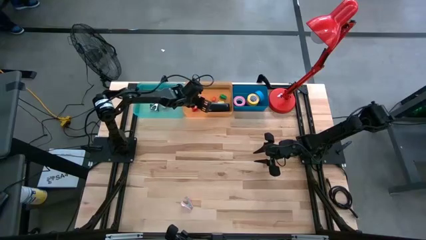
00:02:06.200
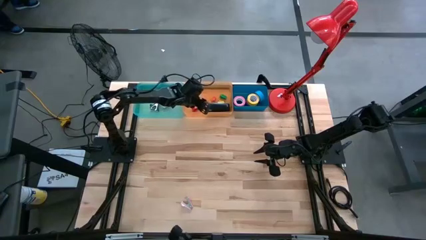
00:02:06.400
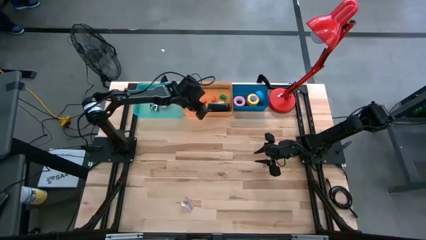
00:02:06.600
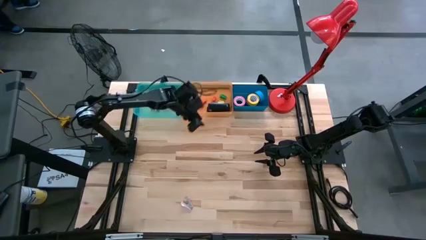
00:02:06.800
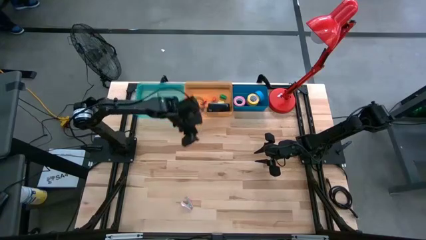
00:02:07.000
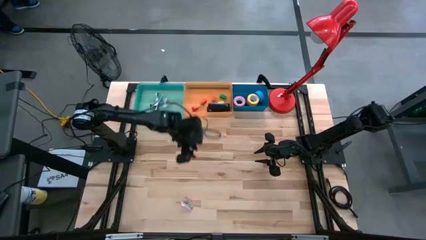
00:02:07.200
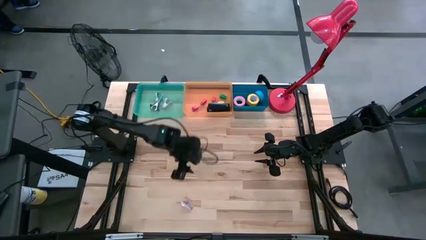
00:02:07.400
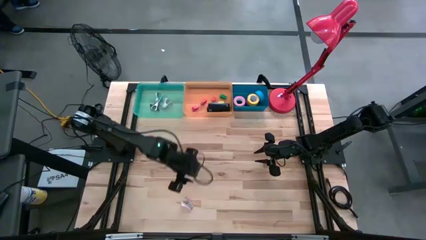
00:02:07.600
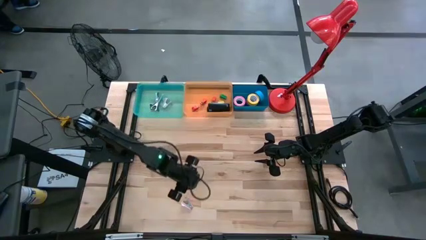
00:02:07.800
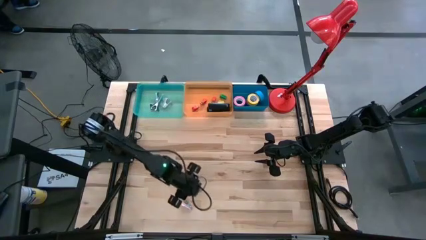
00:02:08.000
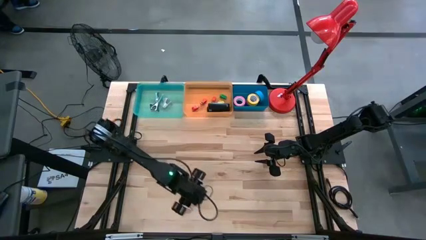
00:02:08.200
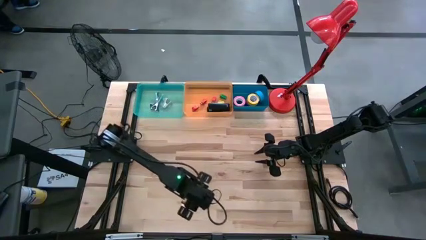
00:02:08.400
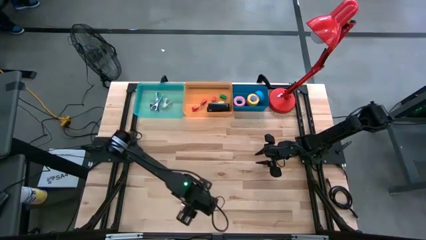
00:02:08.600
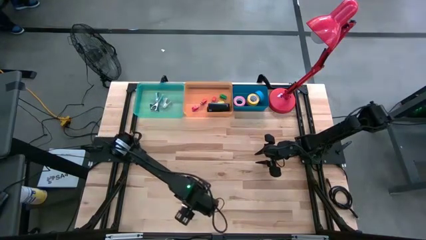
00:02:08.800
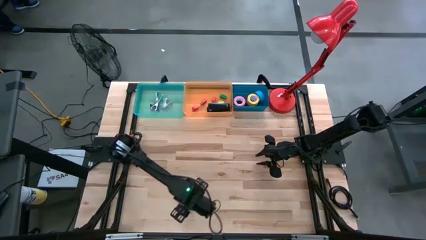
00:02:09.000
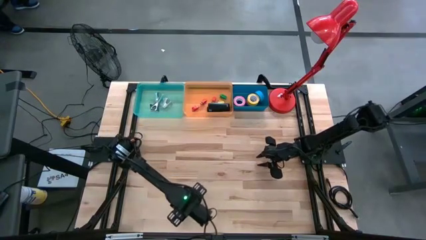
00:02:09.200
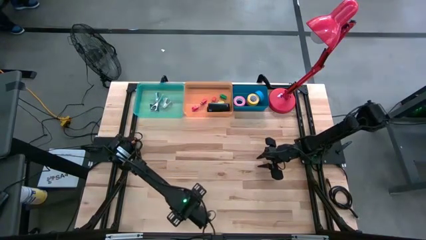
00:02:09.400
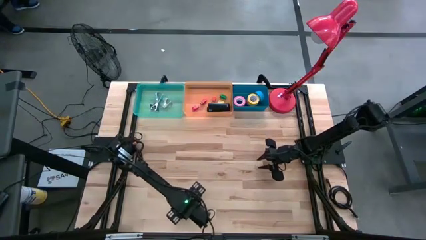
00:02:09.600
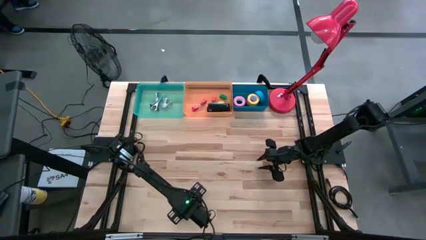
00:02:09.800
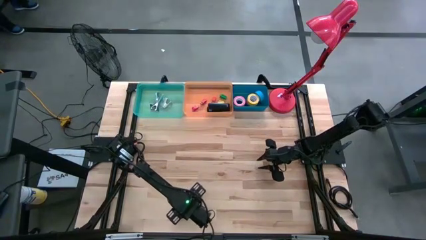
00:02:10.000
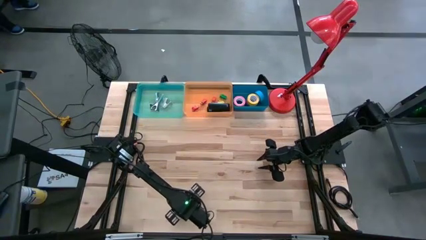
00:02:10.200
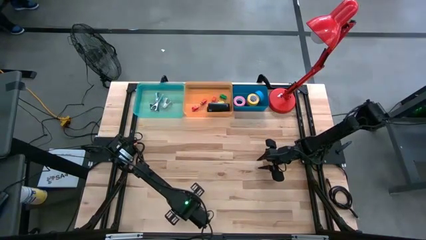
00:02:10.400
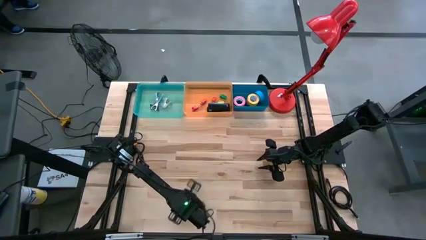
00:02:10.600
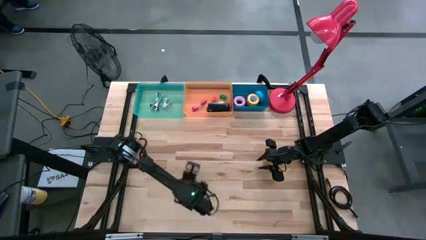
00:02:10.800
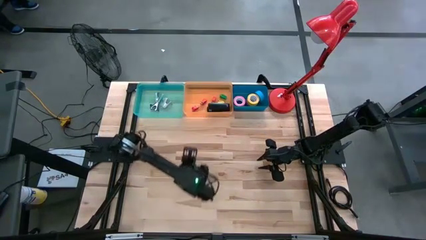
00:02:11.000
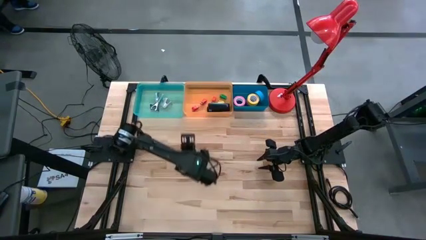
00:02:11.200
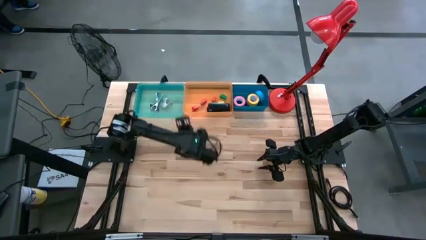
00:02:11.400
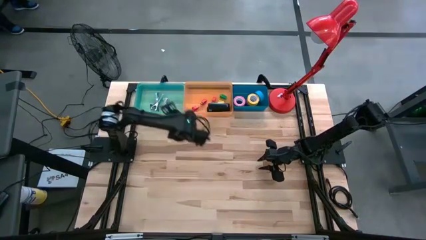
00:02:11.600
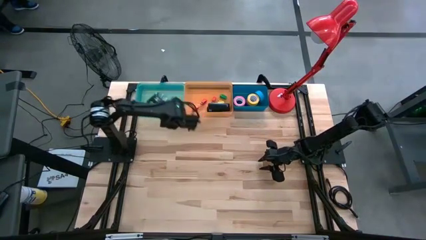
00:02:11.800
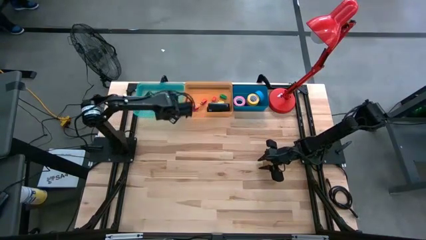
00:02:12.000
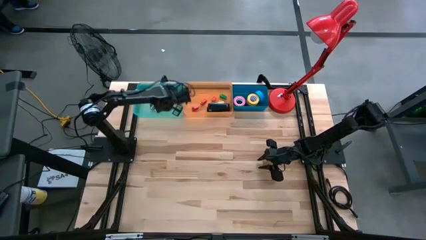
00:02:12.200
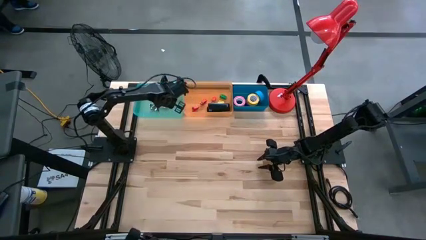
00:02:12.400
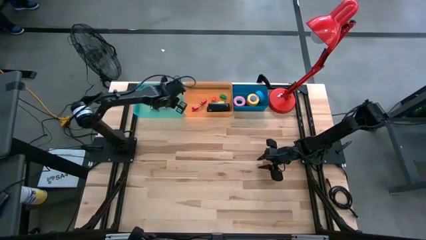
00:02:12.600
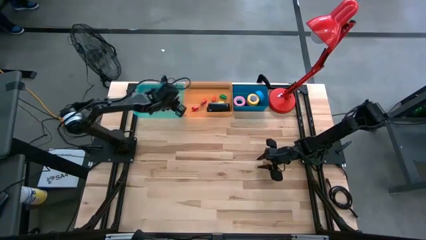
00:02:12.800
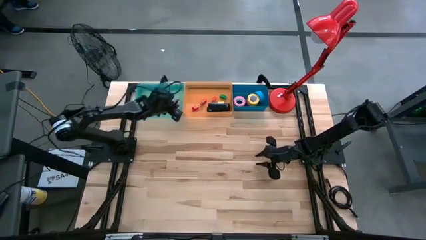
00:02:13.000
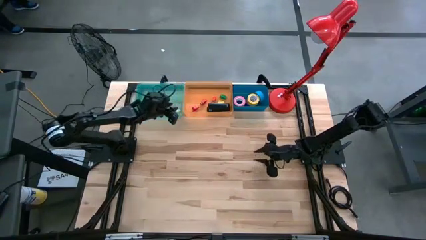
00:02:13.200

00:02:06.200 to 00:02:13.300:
Task: Pick and place Stapler, Stapler remover, tape
Put the pink staple remover into the green bin

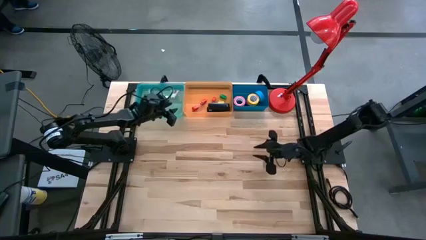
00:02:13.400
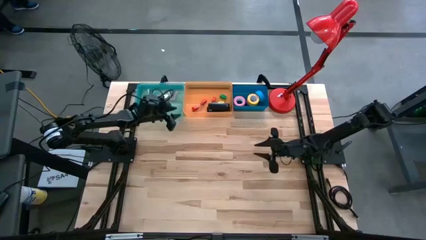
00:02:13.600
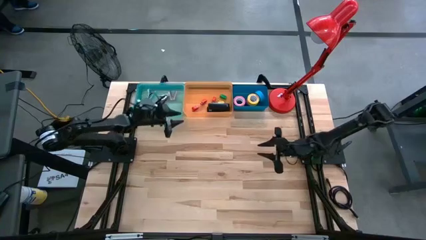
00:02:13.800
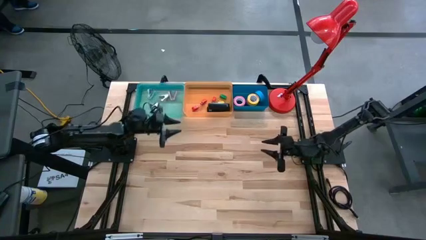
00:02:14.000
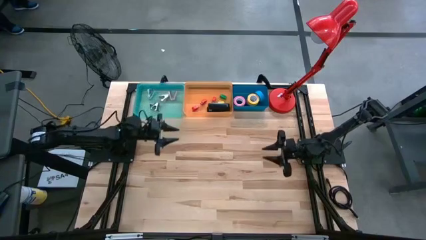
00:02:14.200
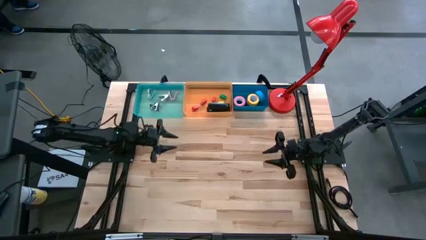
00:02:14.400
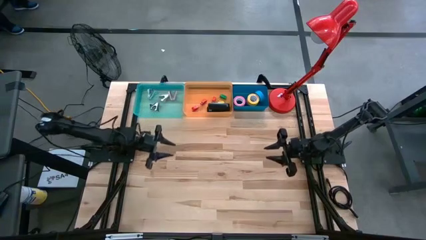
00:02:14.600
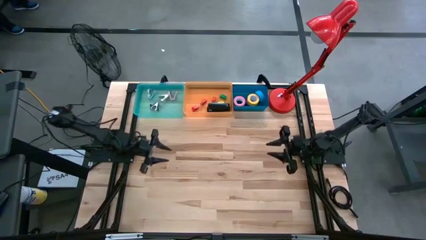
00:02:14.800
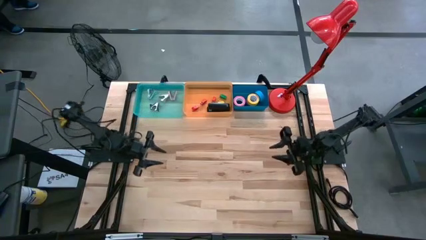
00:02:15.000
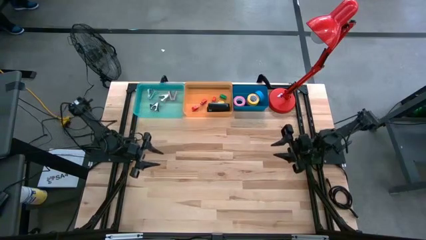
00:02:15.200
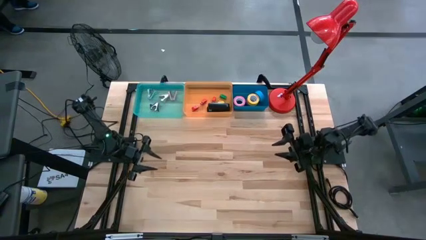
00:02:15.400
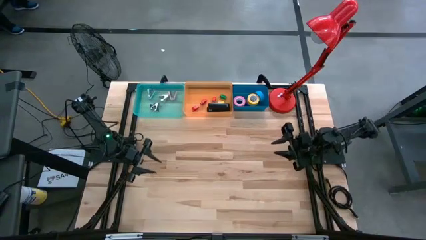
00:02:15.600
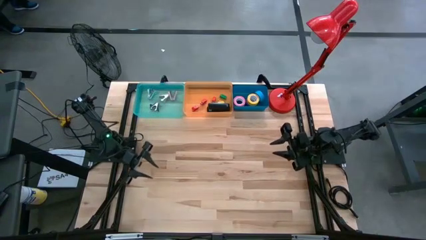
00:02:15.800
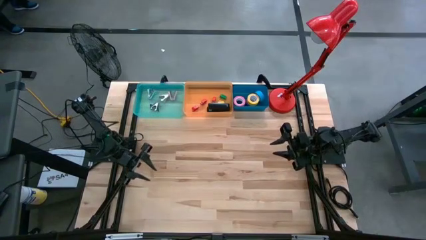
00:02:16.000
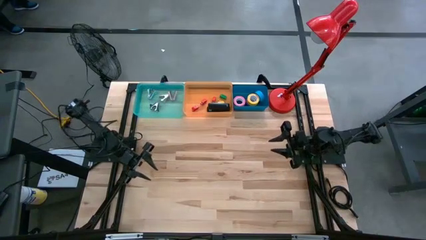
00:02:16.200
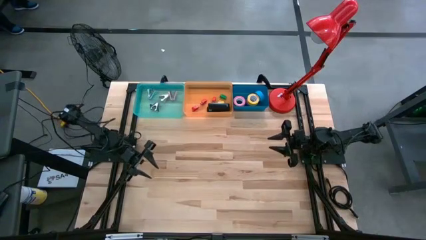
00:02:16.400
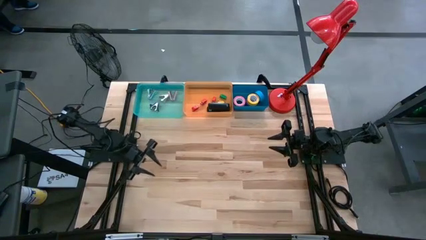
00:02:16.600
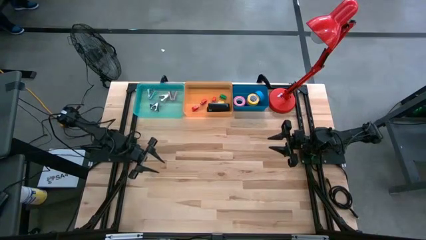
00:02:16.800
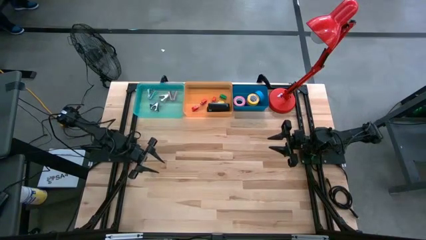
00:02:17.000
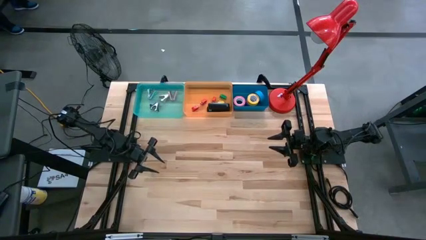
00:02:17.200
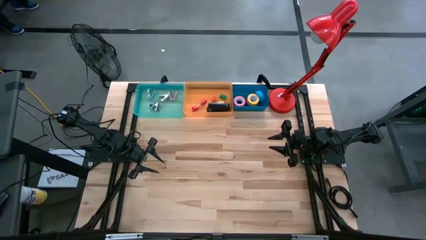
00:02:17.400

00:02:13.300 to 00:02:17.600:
Return to Home Position

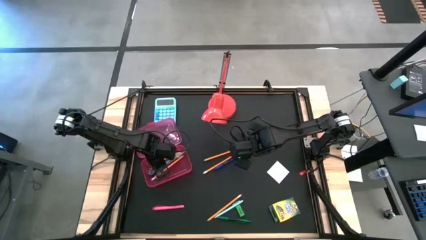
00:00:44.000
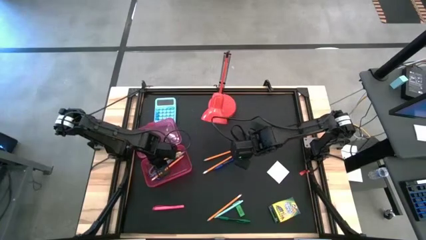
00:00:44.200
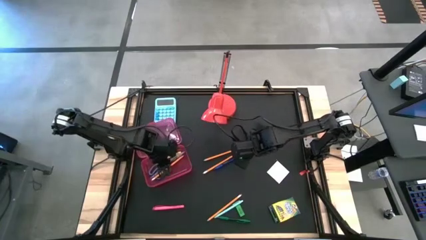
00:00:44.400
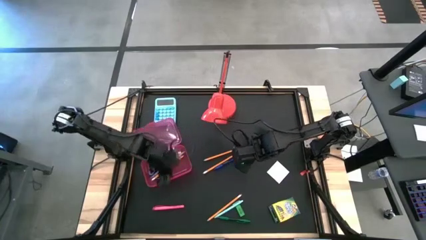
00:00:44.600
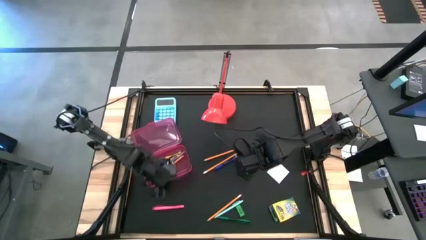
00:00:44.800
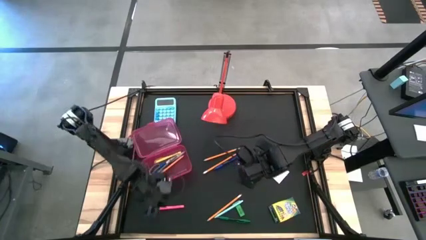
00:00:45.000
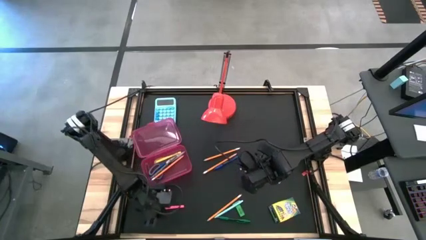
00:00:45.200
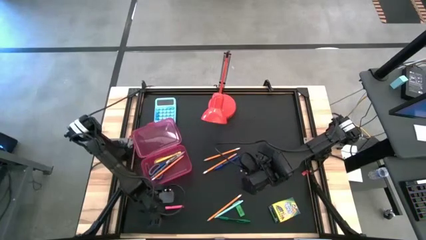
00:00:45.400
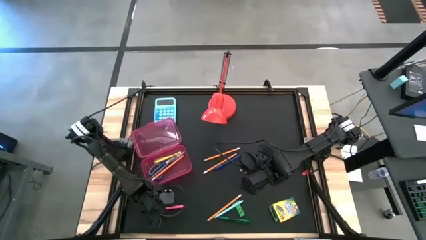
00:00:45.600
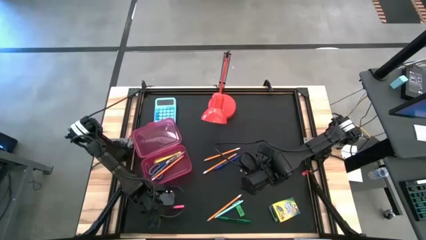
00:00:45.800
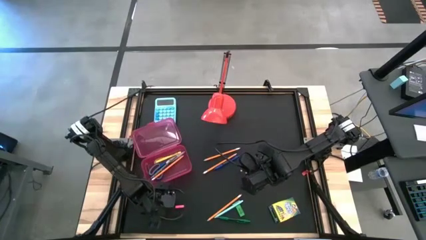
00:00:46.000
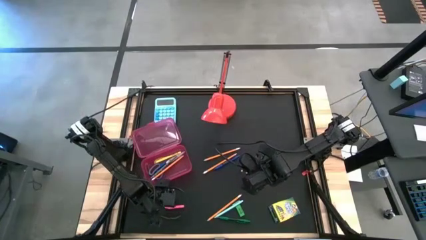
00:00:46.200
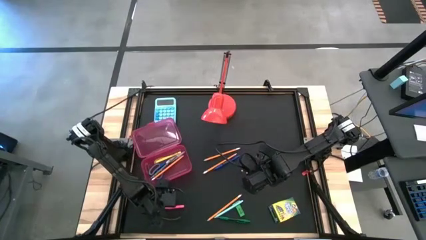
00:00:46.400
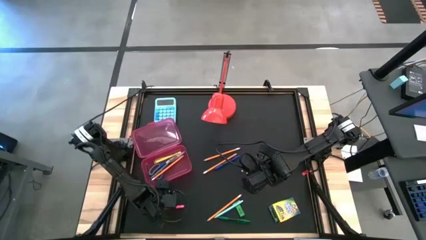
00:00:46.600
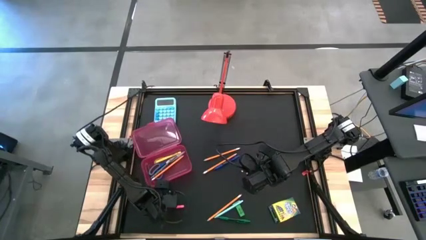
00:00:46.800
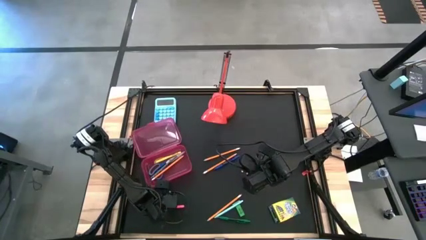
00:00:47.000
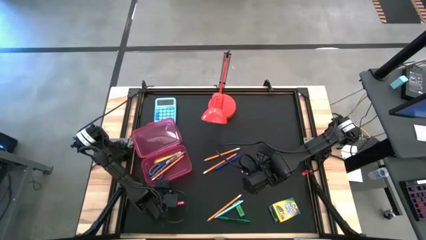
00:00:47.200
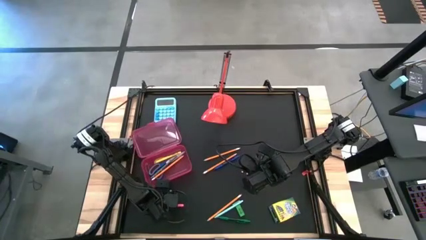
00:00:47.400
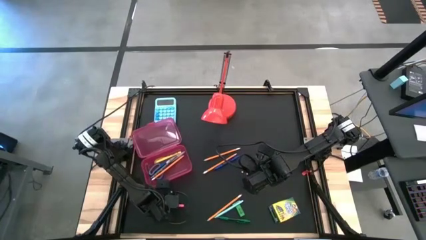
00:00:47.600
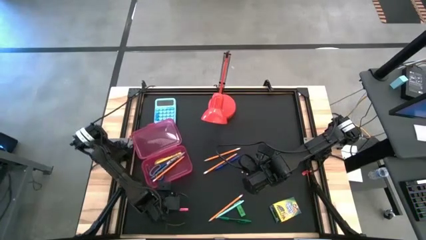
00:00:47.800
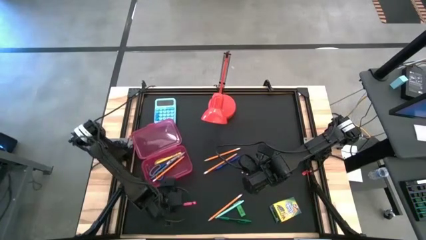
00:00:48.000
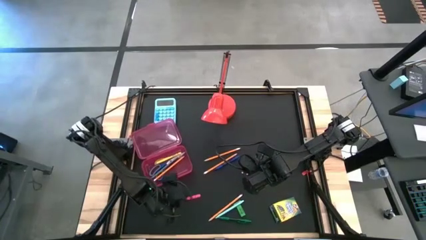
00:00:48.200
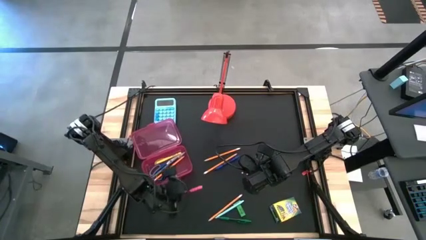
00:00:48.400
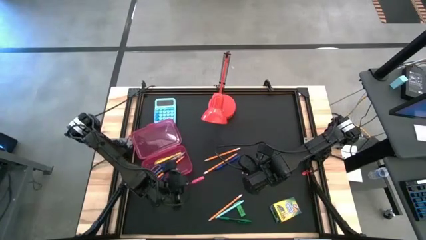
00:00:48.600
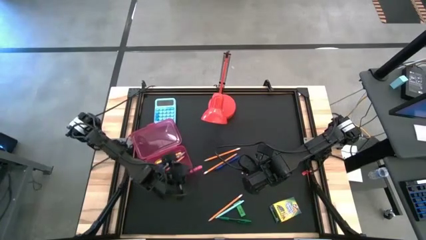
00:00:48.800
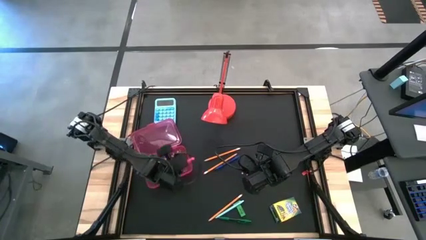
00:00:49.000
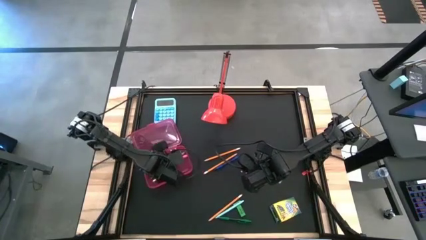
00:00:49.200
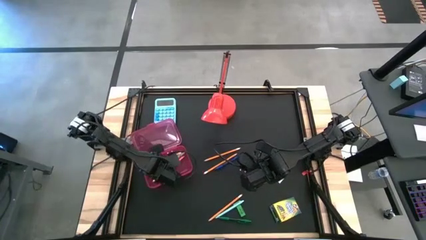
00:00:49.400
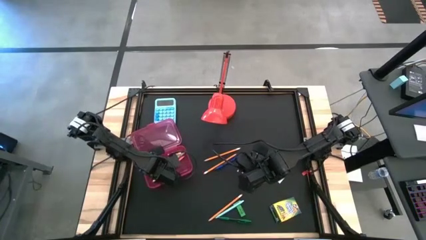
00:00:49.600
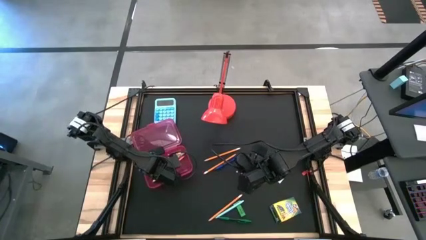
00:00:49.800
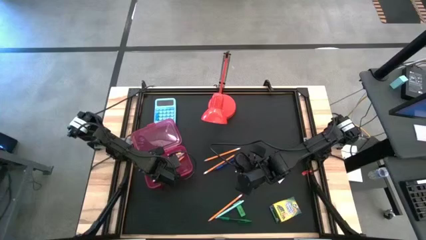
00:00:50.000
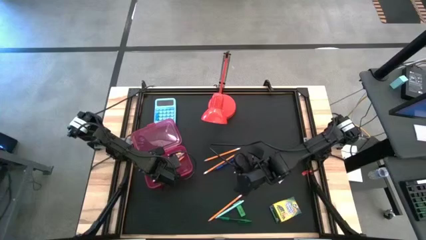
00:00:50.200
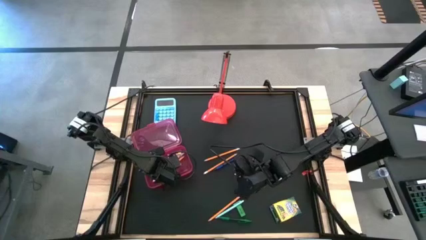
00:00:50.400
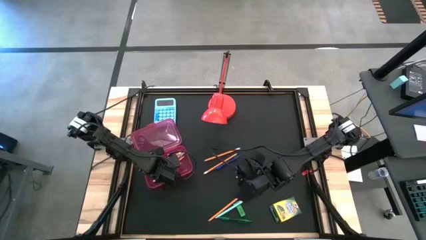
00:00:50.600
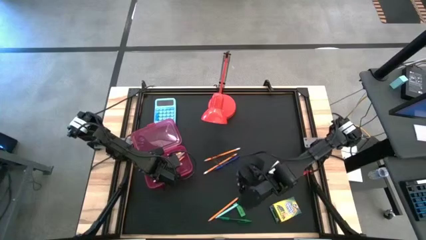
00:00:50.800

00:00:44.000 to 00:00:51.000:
Task: Pack school essentials
Put the pink pen into the red supply box
